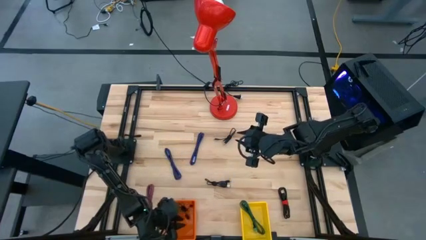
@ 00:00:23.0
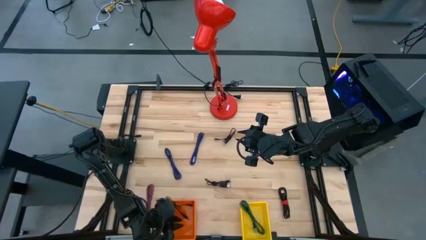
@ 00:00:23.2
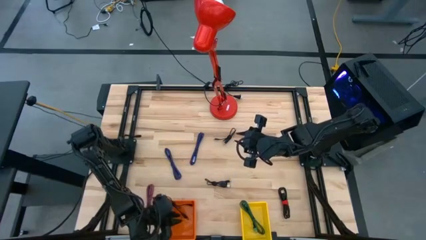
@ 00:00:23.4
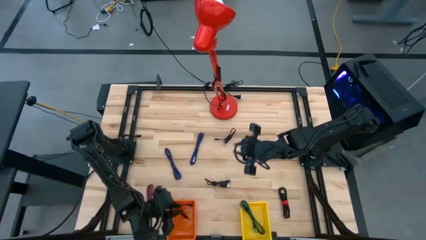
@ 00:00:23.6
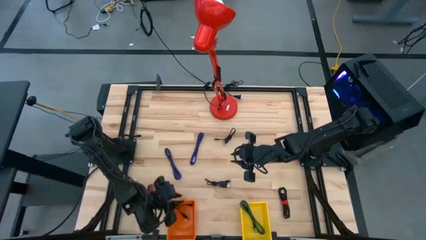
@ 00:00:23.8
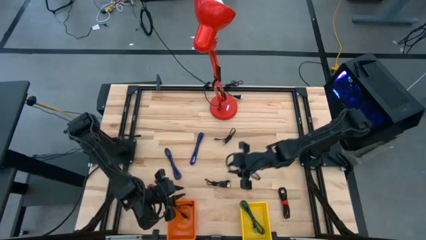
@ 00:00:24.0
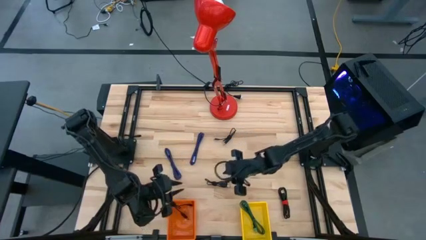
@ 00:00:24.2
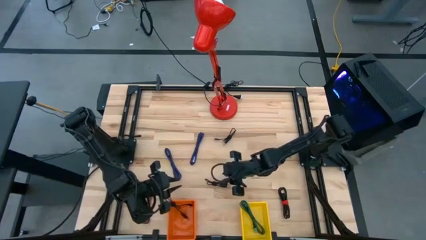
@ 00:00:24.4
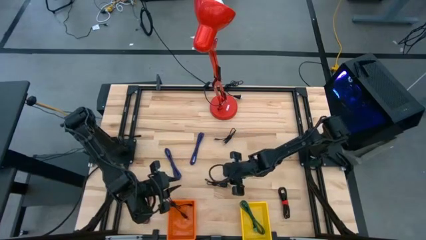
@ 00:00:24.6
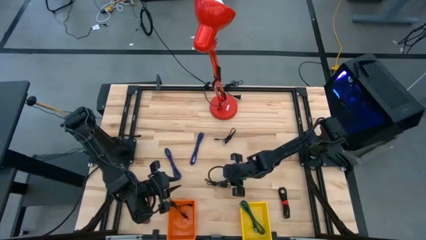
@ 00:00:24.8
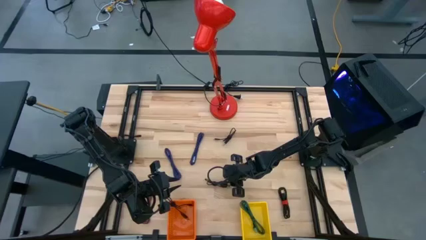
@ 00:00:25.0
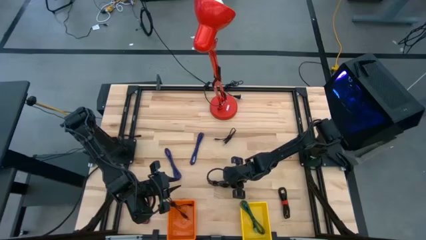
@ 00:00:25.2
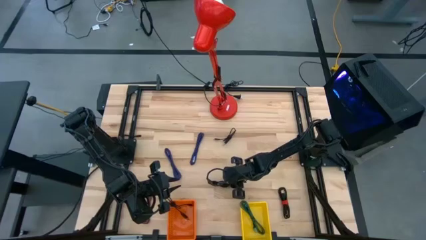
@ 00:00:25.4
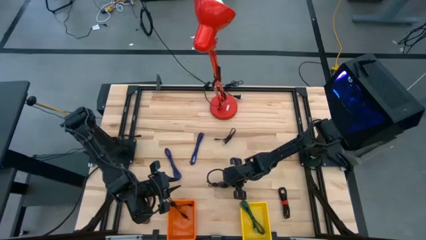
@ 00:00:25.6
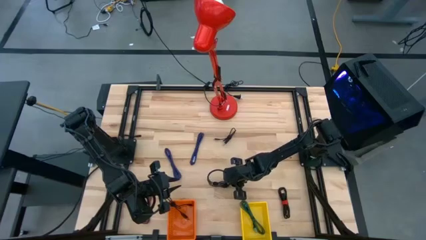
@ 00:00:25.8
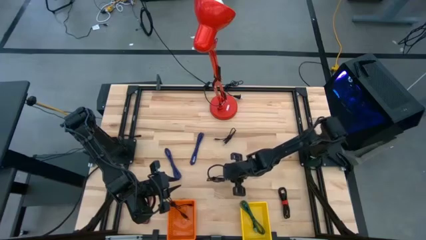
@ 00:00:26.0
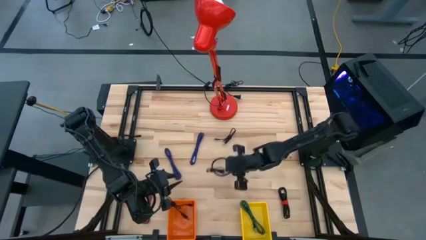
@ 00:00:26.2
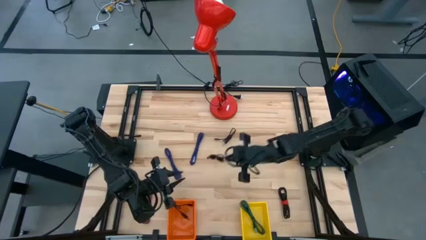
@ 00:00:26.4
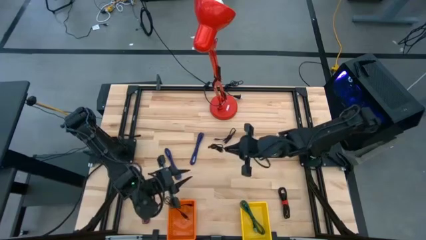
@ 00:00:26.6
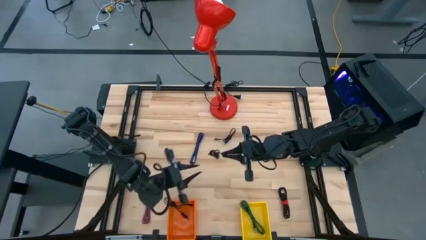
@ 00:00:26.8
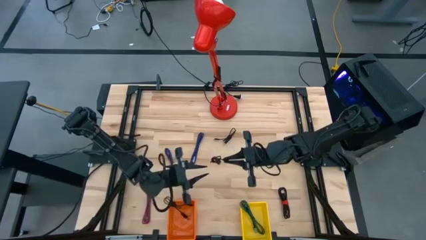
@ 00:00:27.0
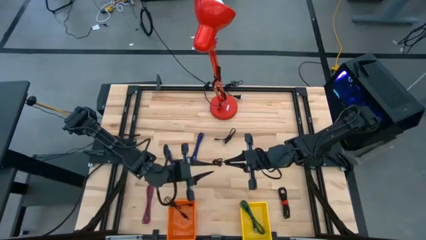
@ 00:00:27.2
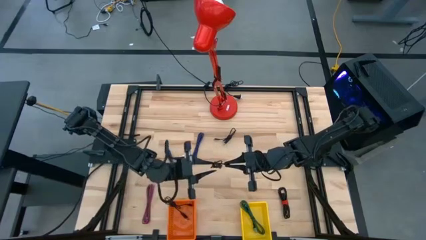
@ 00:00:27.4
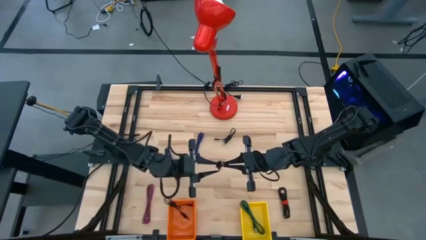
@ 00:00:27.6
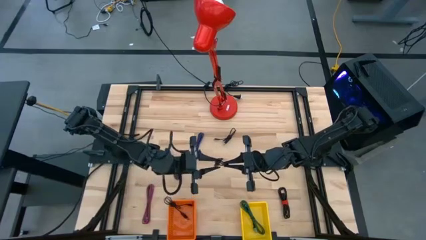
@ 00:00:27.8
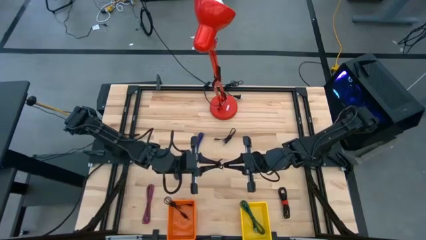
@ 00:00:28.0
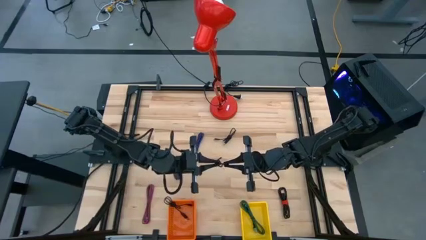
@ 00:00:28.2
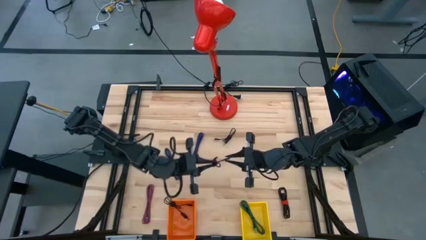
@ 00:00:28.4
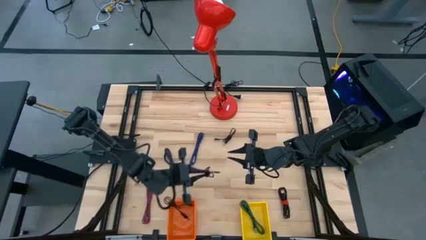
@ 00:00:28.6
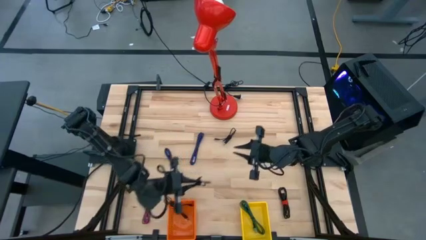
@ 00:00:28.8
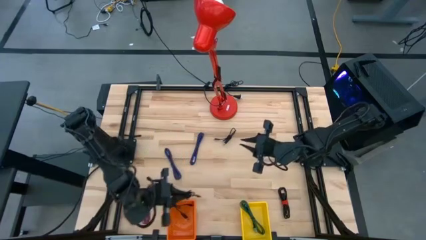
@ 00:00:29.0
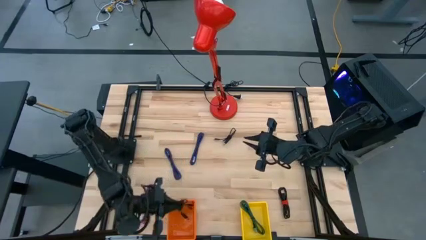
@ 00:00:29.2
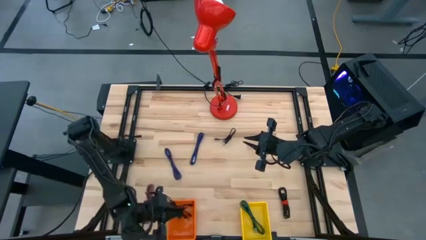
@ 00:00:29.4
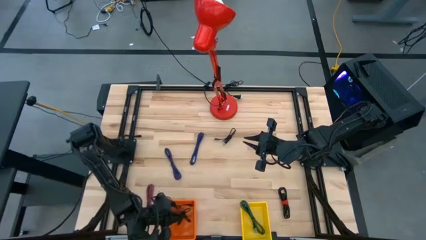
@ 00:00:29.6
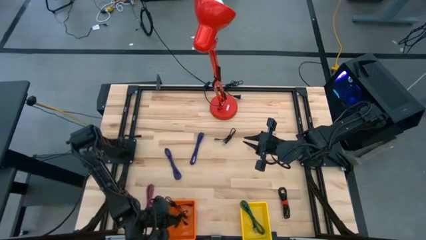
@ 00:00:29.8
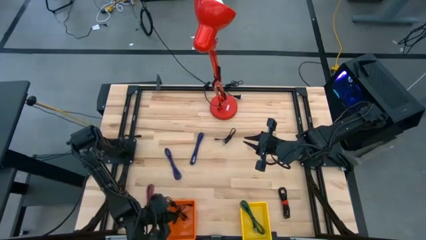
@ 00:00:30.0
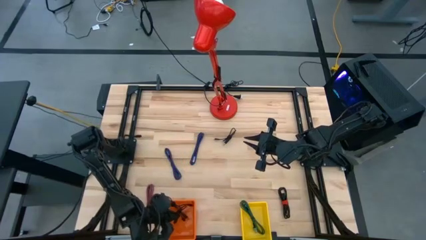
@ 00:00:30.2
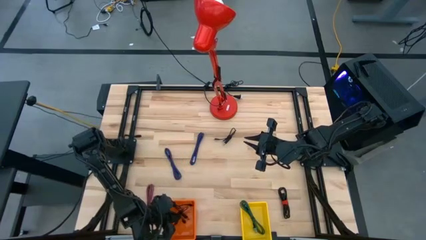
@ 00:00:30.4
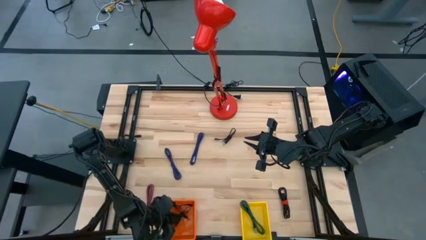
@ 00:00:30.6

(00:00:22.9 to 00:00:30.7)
Task: Pick & Place USB Port
Put the black charger cable into the orange bin

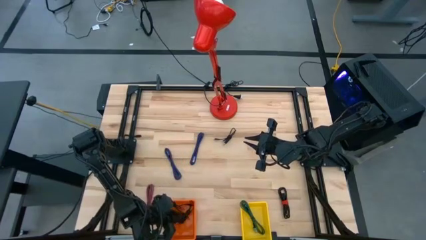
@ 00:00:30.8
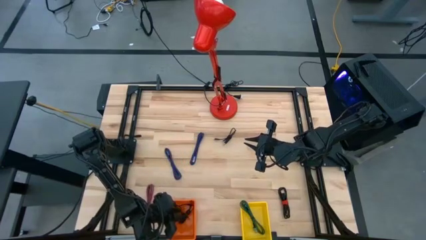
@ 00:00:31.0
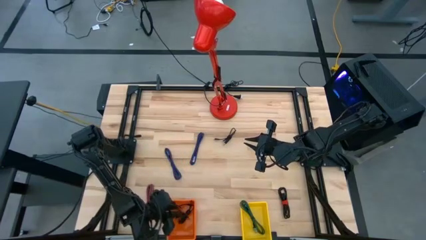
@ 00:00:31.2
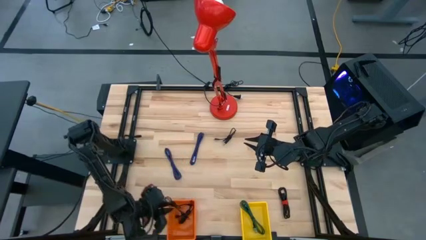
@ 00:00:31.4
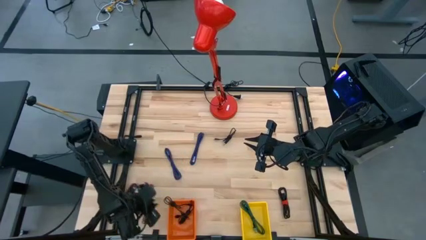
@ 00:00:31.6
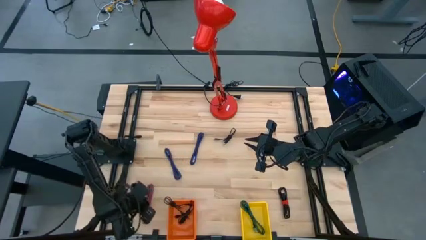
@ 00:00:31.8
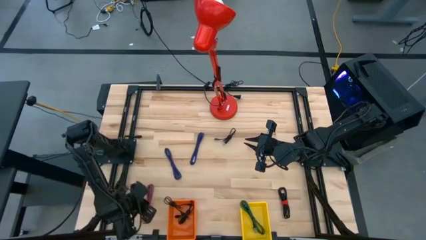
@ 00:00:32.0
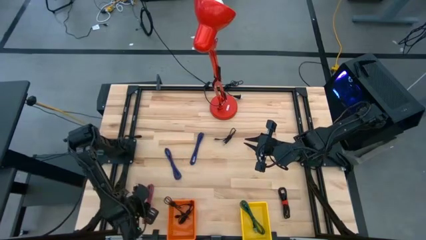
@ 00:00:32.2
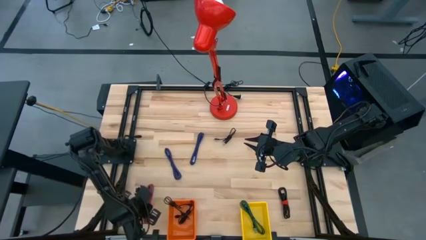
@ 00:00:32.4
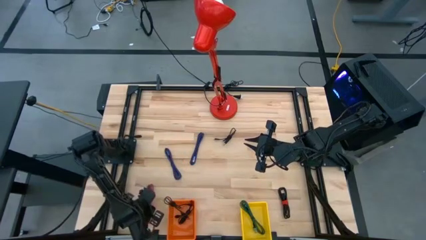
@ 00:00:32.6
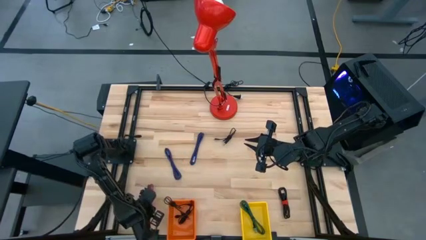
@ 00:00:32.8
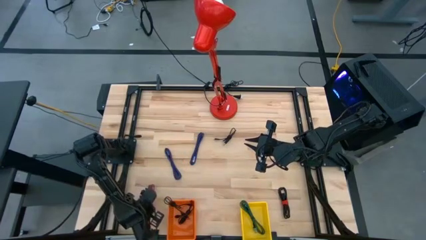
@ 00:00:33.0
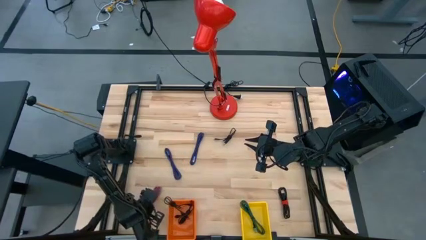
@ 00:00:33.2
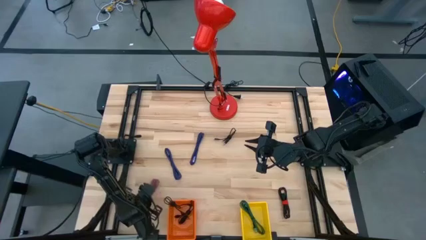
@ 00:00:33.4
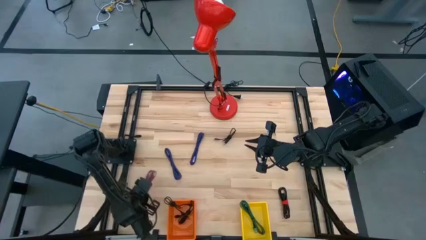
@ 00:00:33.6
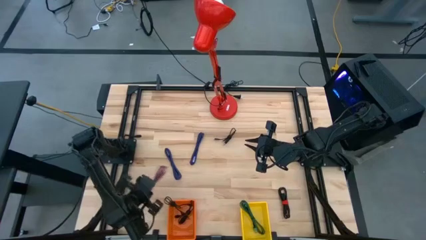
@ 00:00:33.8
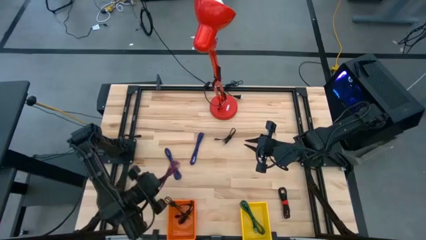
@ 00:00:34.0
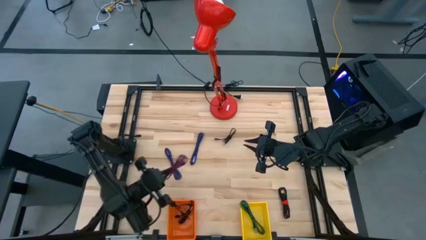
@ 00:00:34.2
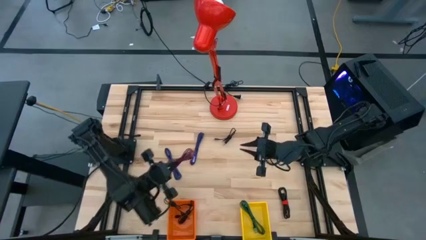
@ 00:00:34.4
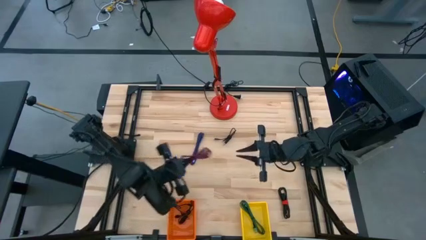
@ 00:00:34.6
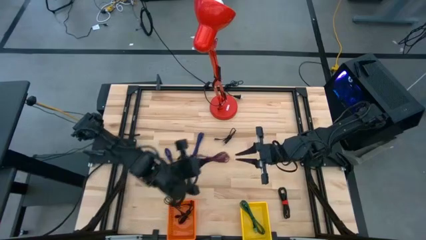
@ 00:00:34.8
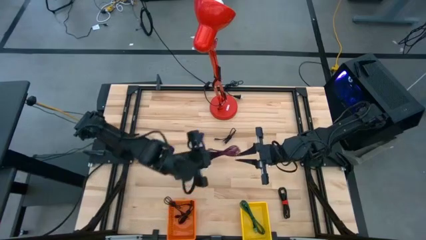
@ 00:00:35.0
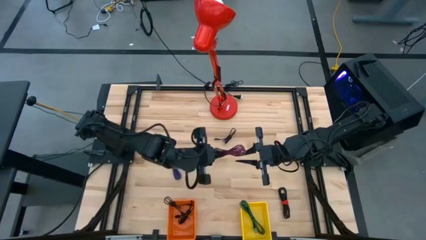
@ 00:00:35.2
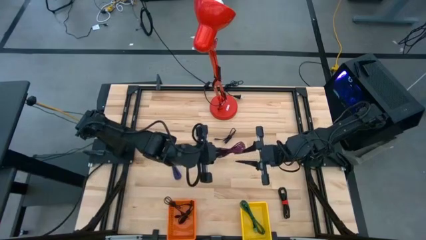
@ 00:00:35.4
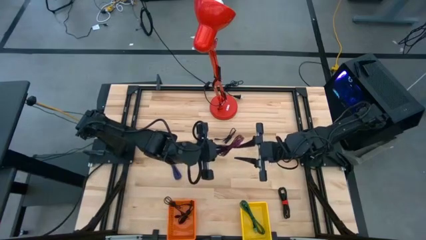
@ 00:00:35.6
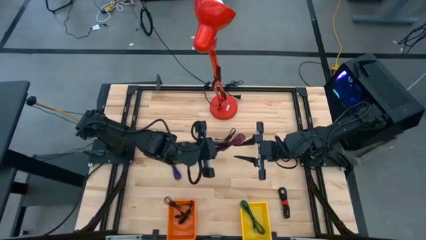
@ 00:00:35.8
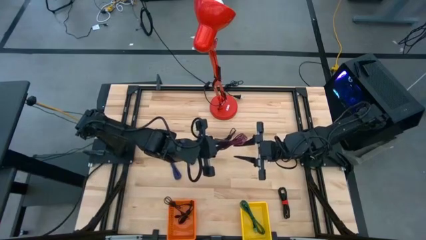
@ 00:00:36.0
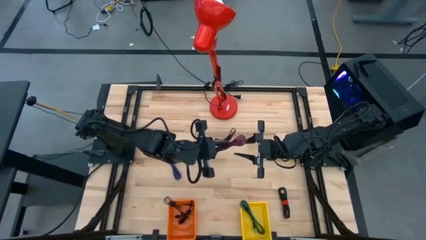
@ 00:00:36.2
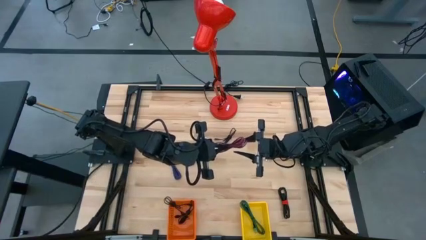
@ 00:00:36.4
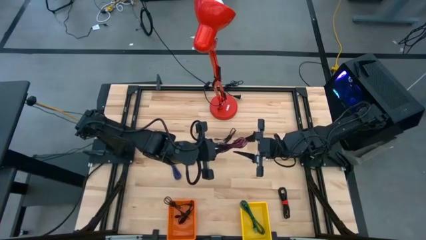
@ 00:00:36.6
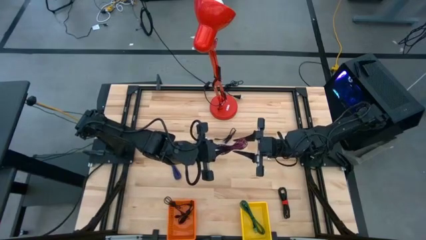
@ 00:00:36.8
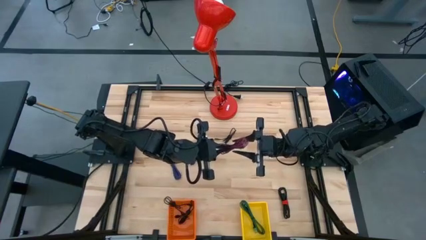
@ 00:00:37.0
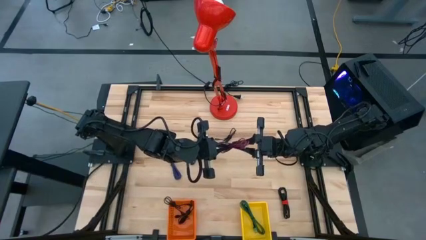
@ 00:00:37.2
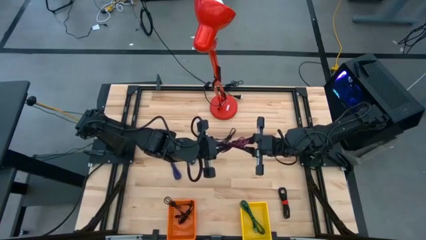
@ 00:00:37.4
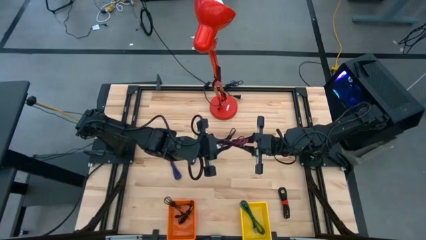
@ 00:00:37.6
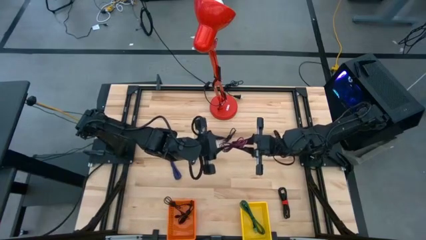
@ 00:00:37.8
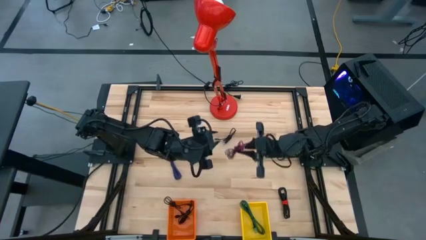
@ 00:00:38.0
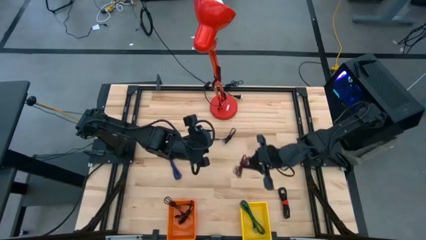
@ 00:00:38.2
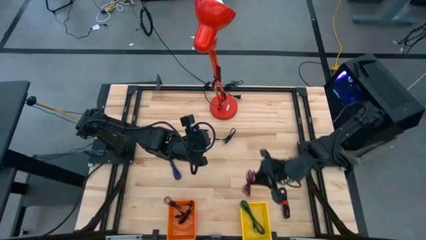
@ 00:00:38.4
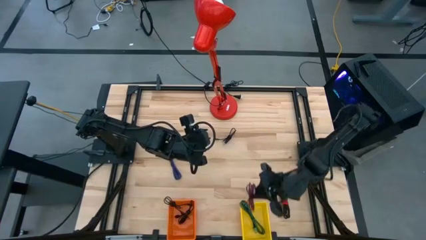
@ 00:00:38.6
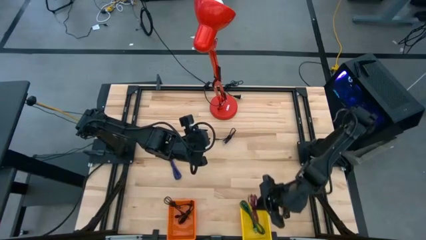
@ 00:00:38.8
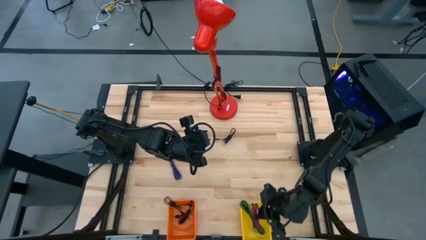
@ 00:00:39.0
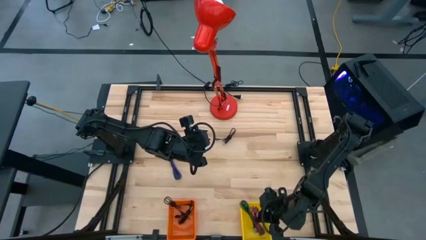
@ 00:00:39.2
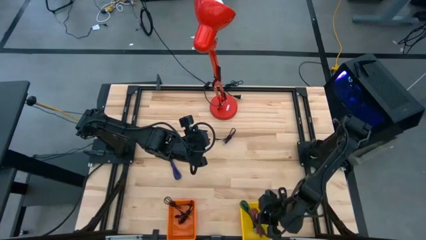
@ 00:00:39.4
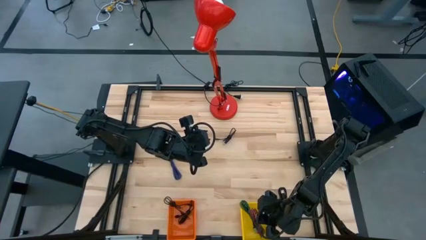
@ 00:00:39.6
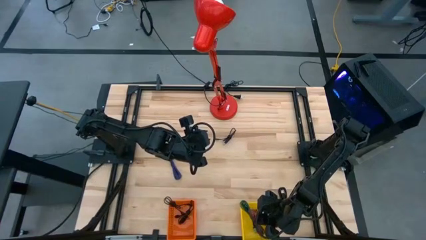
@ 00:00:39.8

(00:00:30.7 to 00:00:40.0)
Put the pink charger cable into the yellow bin
